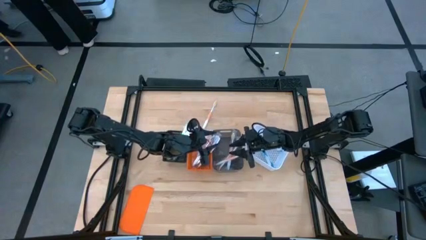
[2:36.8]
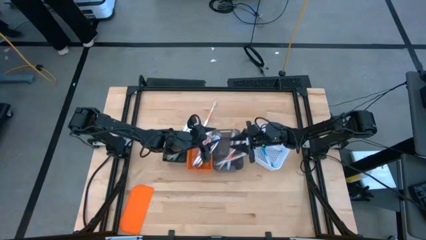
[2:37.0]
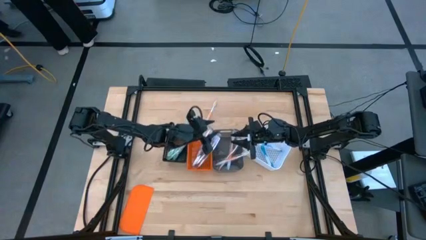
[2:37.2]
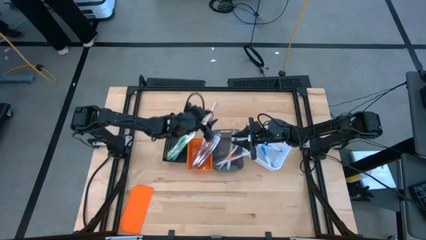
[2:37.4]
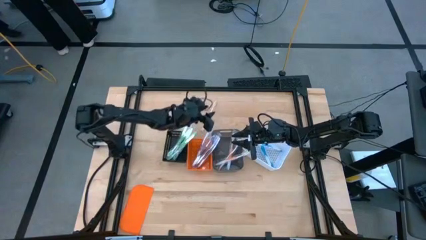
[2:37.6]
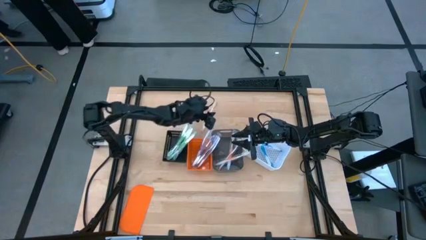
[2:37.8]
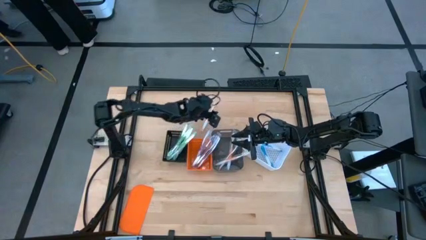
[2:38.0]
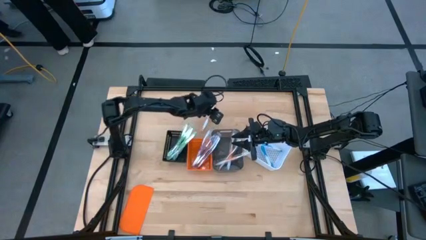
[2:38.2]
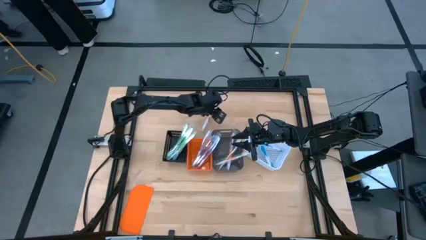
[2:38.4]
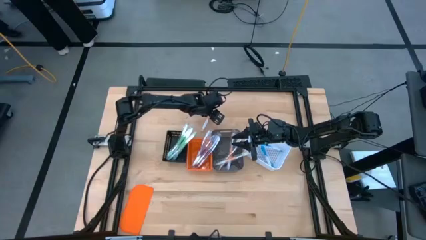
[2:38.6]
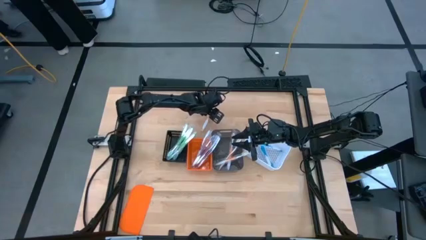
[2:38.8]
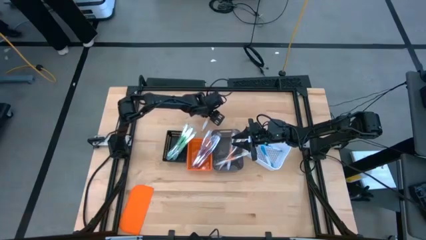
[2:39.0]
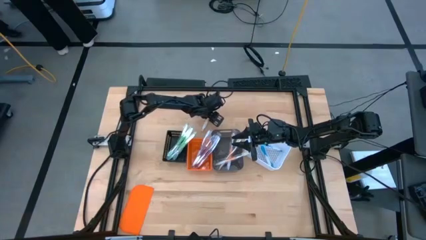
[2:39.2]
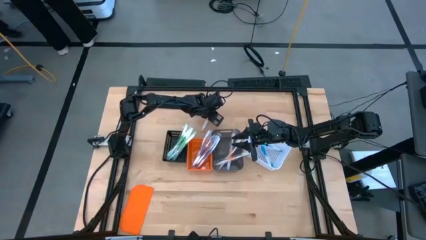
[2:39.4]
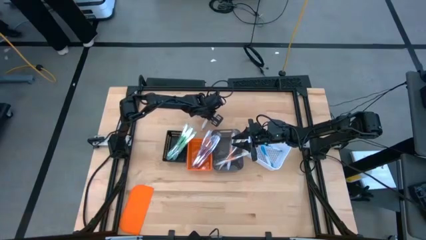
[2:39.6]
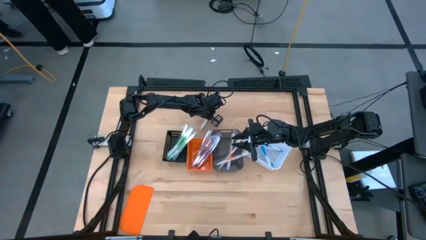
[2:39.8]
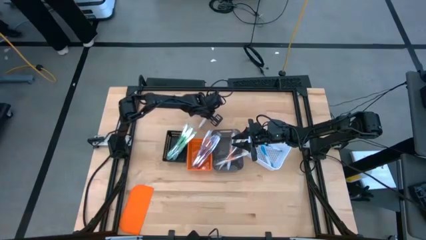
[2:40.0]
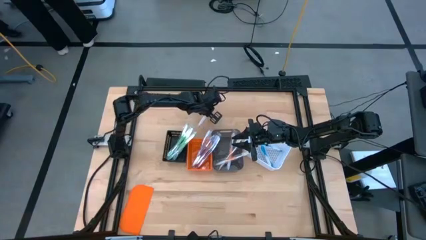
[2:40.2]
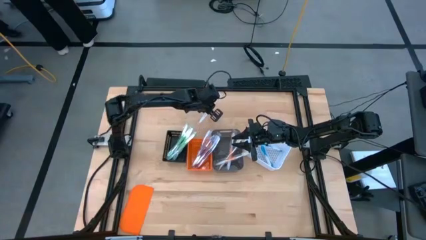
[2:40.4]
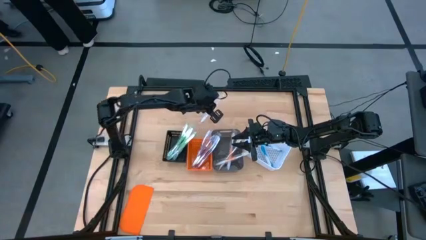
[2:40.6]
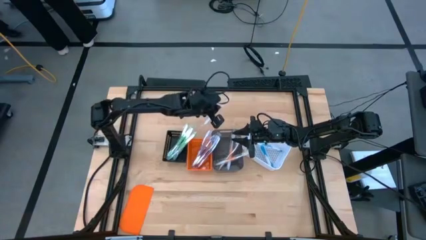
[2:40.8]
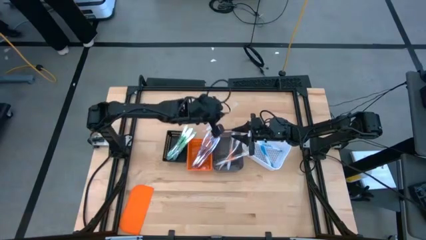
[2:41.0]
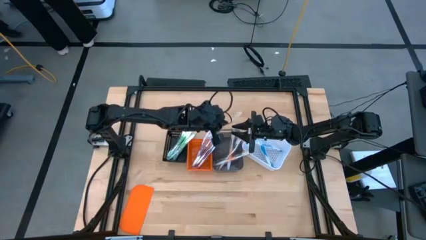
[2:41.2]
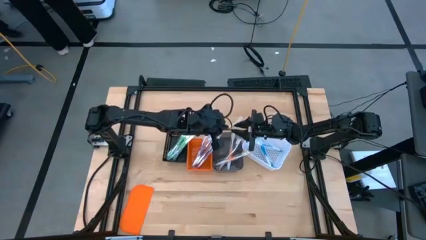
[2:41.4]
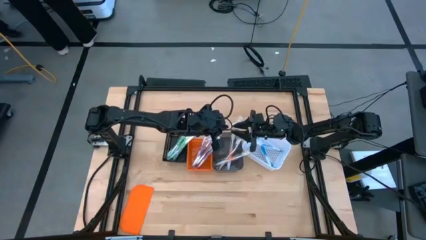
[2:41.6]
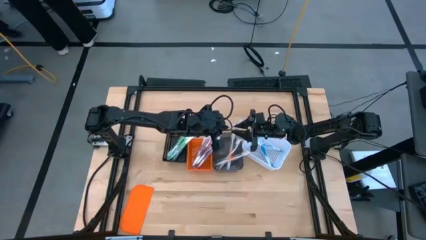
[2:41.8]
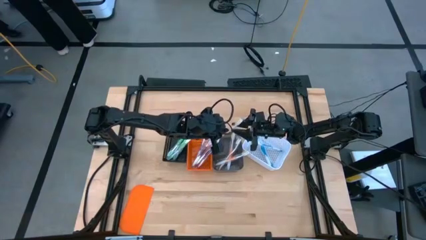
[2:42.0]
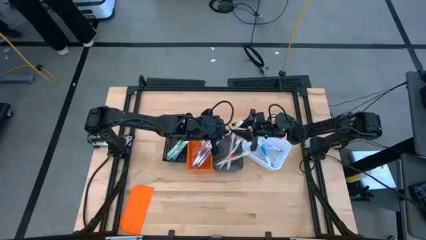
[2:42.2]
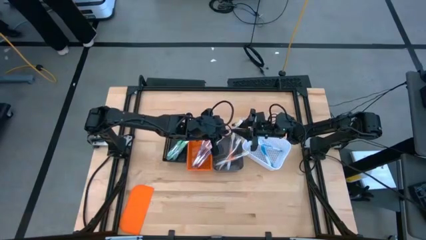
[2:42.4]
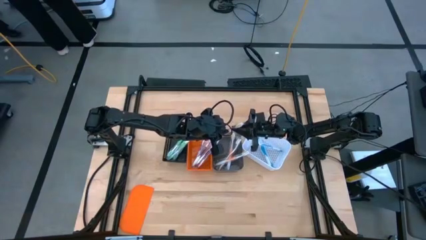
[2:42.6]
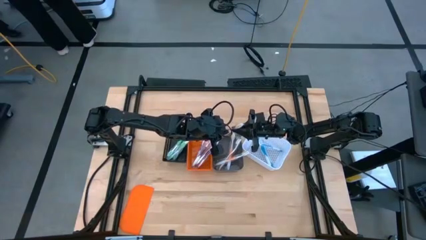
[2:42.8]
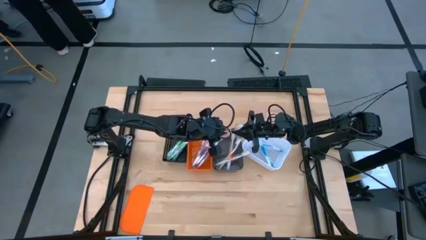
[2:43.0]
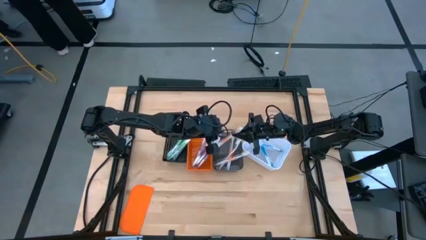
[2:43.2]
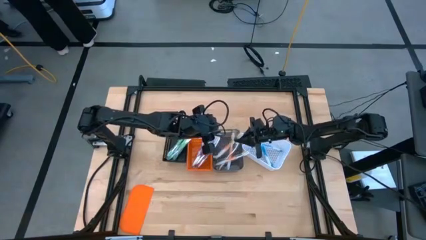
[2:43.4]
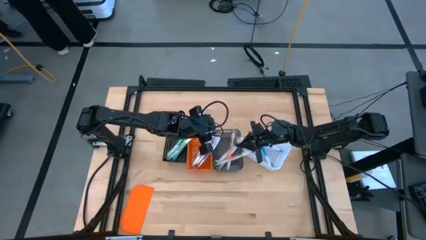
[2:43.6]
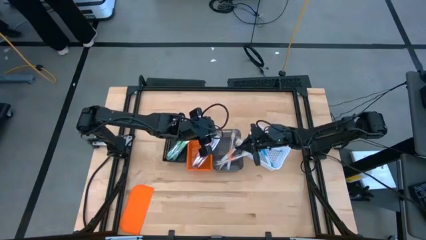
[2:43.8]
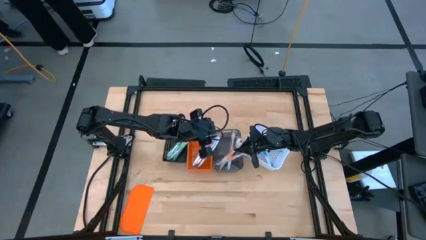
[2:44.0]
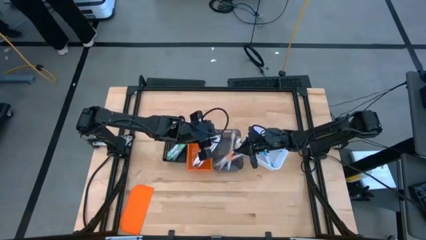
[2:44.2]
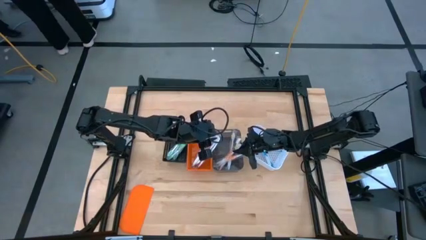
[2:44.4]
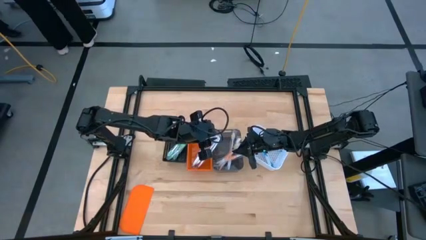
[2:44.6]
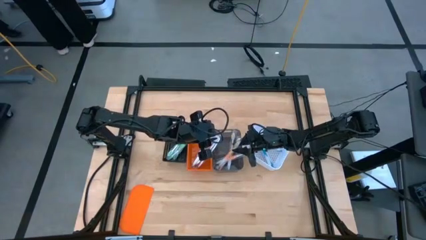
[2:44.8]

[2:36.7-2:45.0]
Task: Pick & Place Toothbrushes
Put the orange toothbrush into the black transparent bin

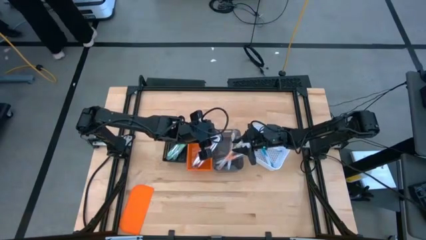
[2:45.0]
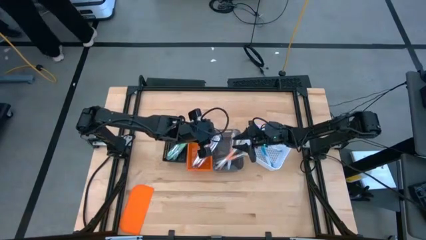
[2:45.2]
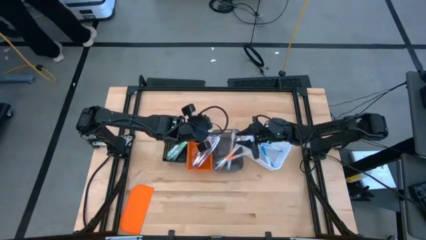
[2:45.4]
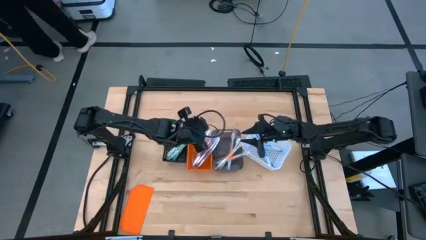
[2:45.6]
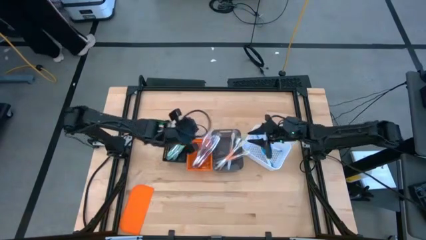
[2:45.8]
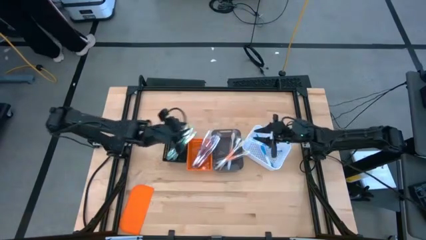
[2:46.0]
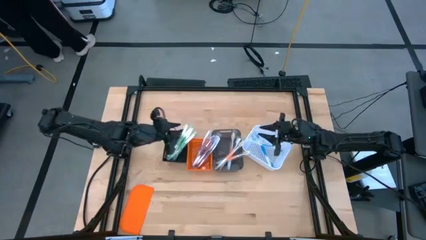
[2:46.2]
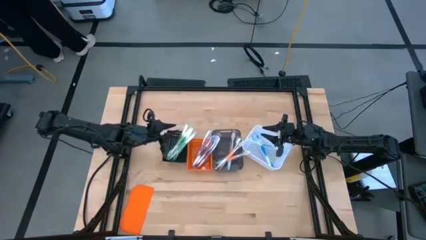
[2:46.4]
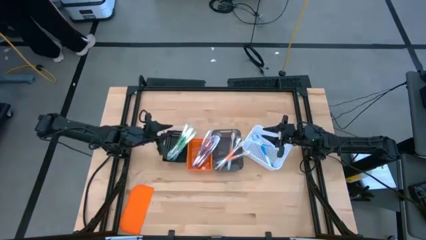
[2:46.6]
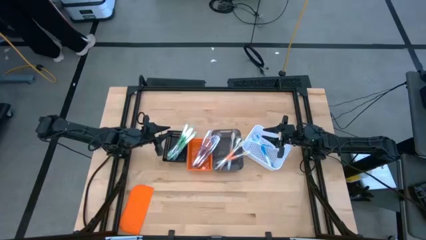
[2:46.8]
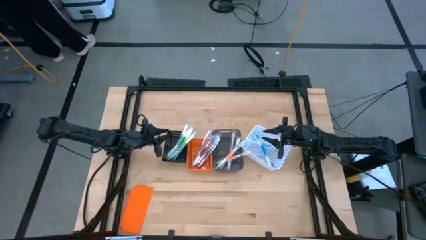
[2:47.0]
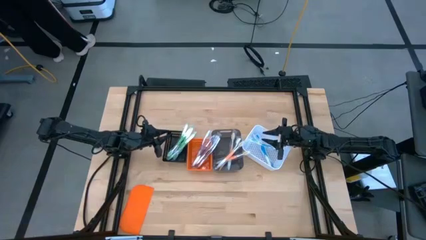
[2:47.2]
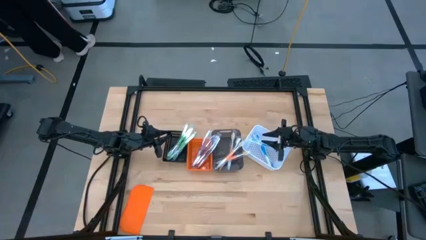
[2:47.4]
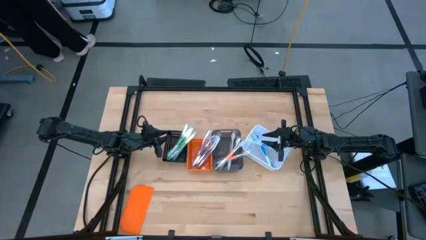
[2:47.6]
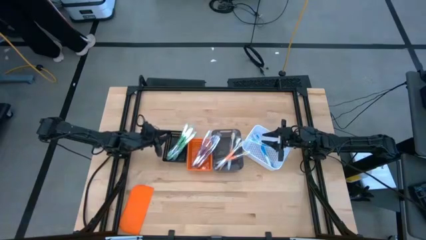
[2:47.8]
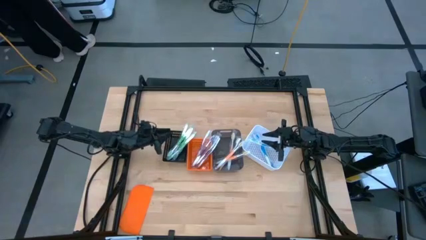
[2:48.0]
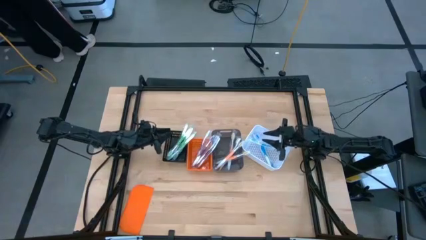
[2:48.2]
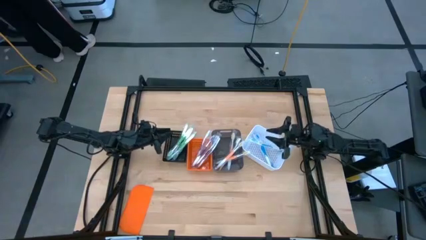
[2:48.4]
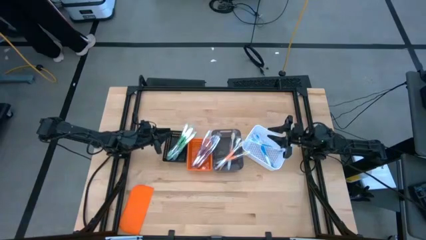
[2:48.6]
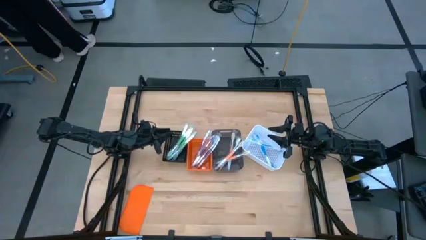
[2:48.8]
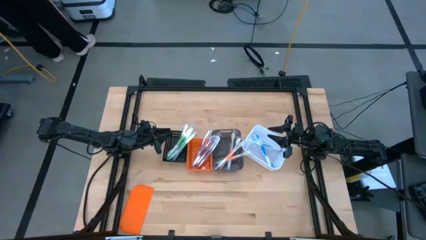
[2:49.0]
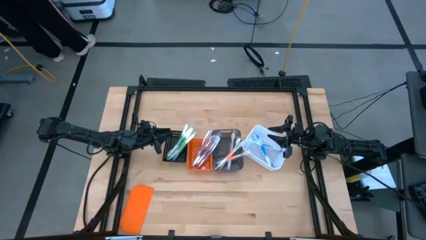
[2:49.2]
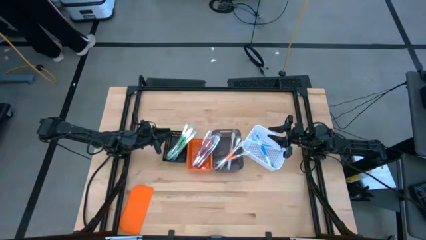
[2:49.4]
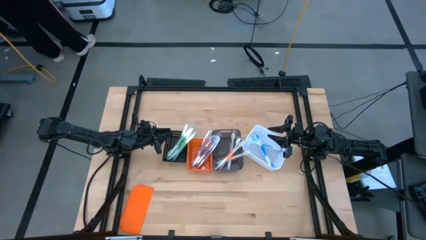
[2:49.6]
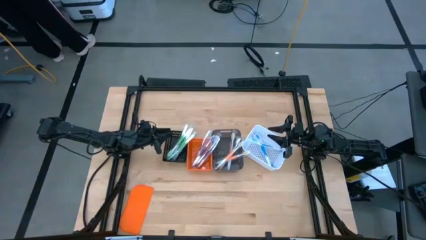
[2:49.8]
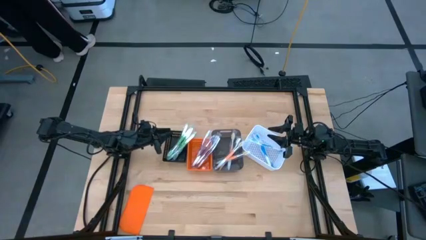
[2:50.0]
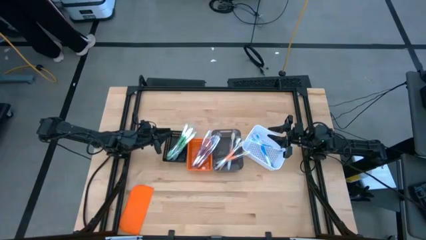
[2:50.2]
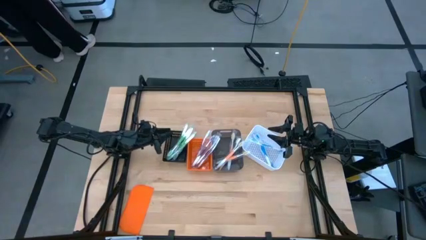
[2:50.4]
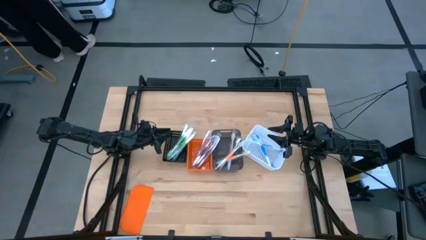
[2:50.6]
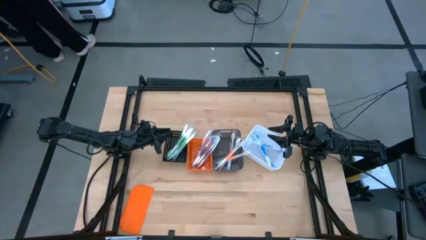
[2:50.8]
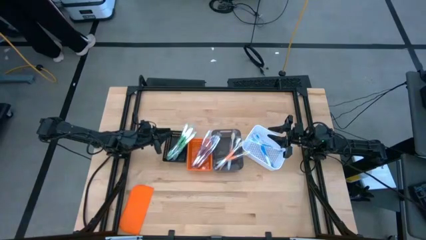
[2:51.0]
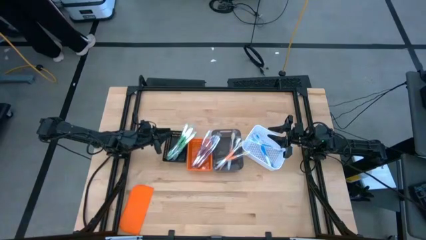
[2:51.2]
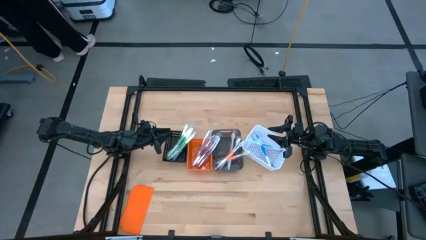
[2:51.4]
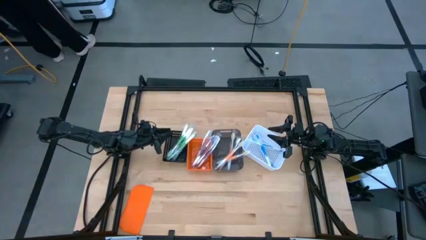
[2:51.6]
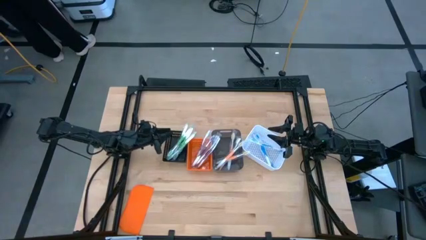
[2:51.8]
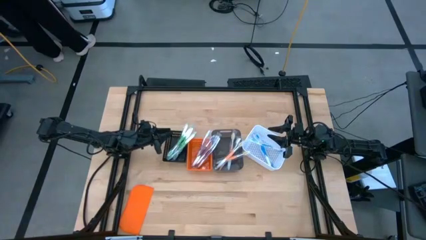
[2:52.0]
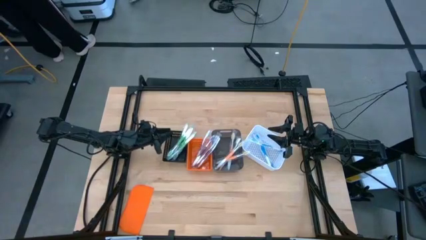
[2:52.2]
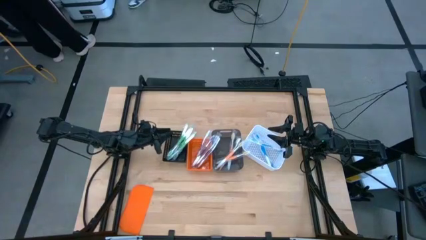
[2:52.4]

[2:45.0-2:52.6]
Return to home position

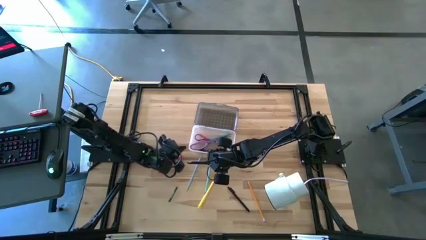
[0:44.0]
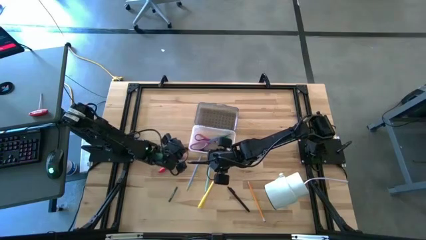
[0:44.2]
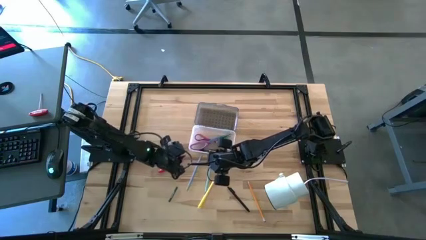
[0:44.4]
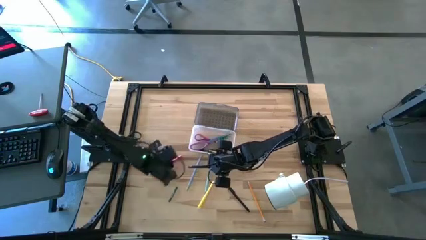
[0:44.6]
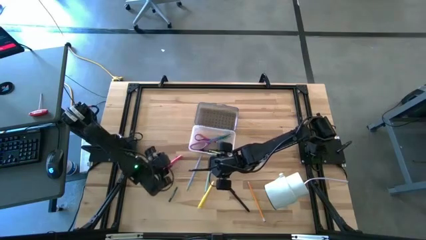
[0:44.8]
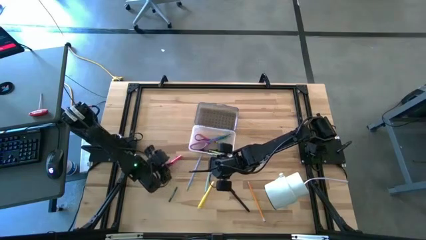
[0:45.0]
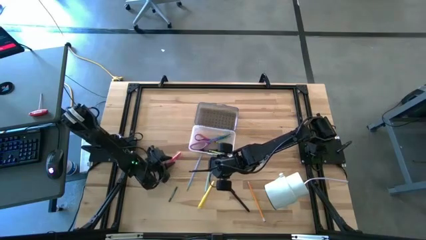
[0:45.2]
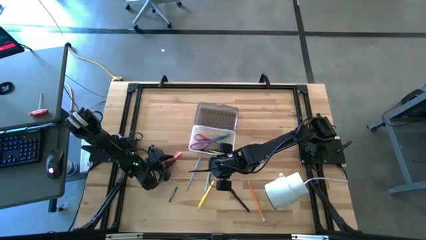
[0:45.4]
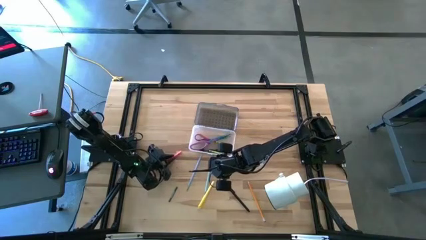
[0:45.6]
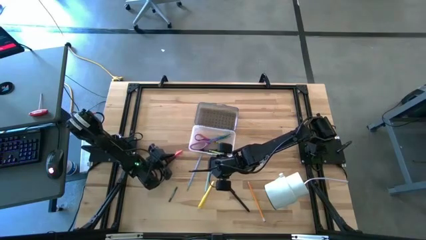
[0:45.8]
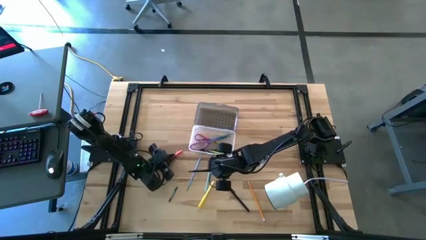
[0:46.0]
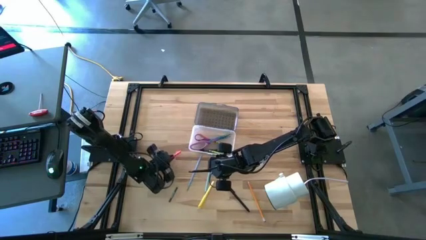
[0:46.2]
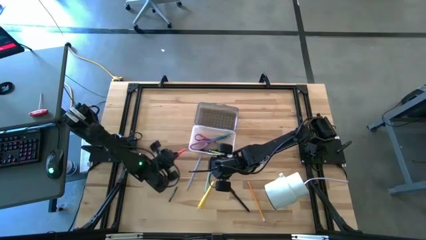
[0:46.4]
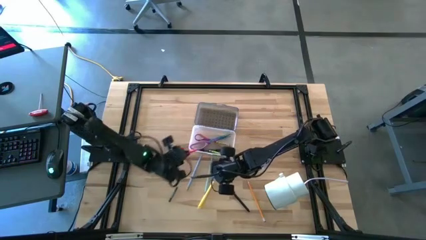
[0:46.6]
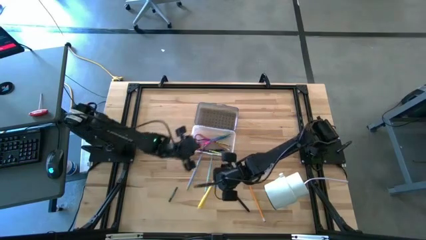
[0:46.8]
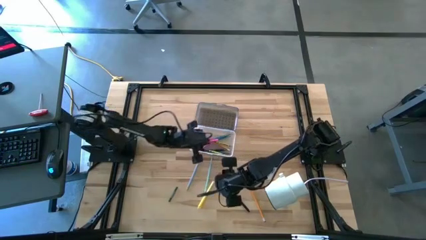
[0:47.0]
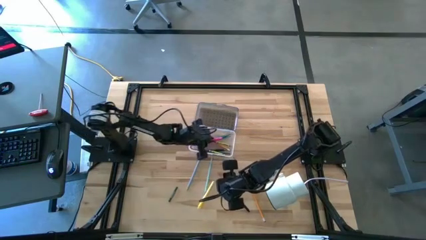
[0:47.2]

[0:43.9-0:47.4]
Task: Pick & place school supplies into a supply box
Put the pink pen into the black supply box
